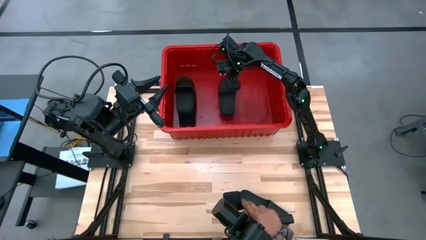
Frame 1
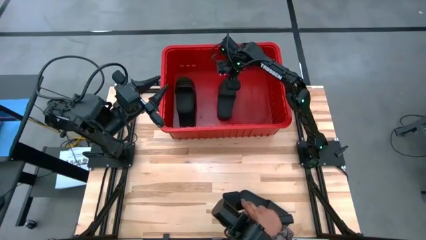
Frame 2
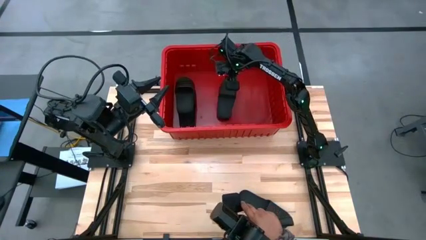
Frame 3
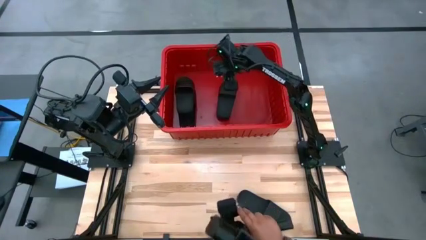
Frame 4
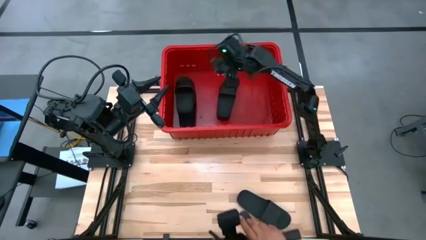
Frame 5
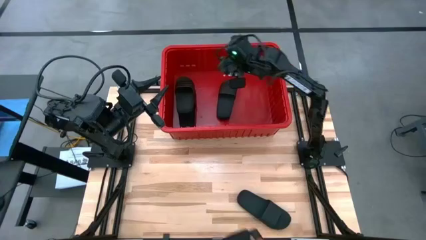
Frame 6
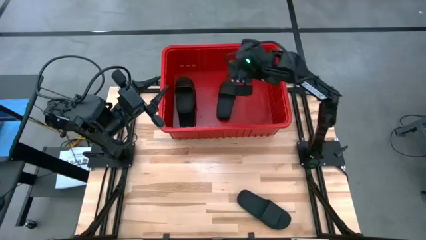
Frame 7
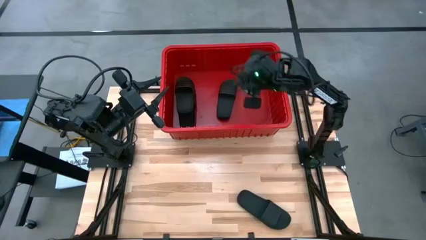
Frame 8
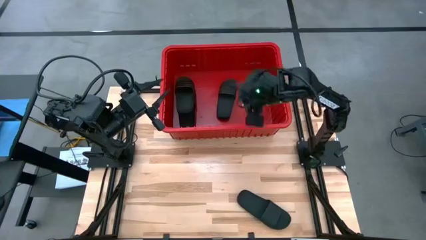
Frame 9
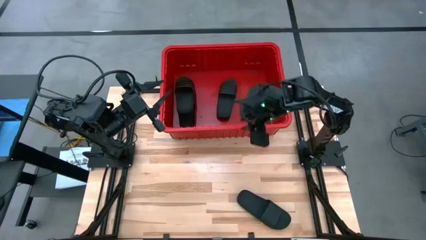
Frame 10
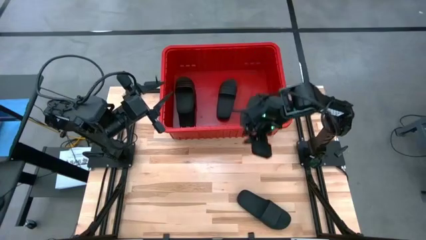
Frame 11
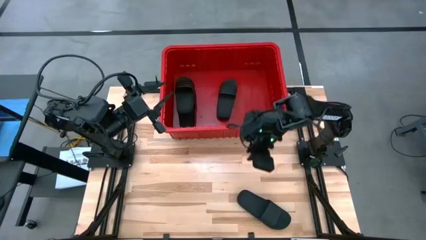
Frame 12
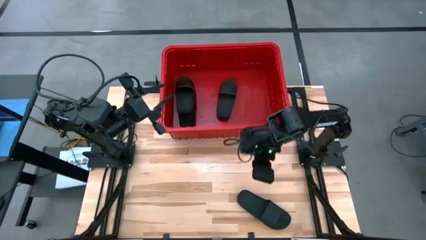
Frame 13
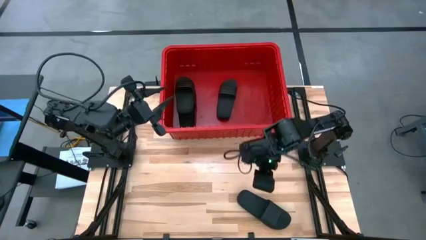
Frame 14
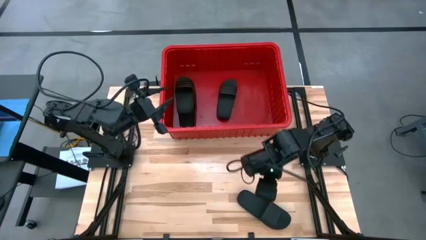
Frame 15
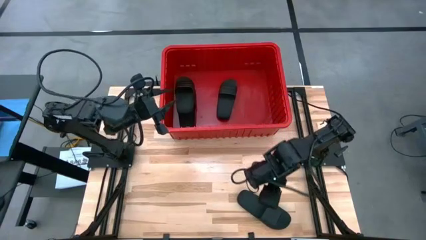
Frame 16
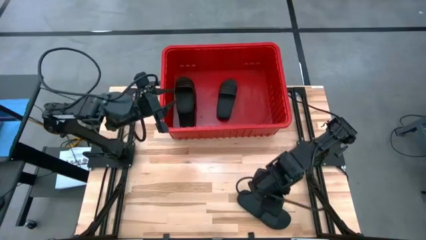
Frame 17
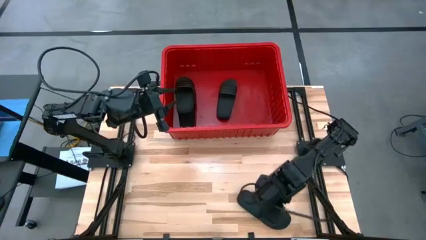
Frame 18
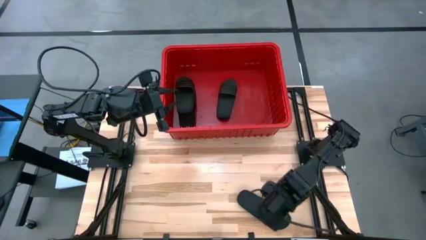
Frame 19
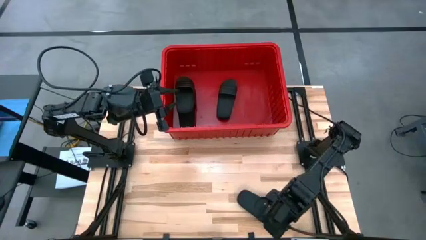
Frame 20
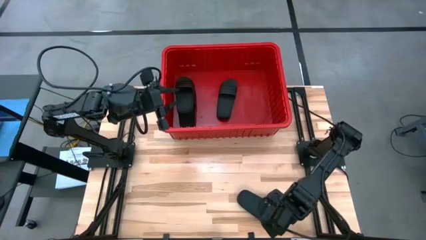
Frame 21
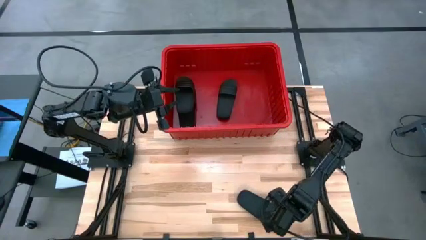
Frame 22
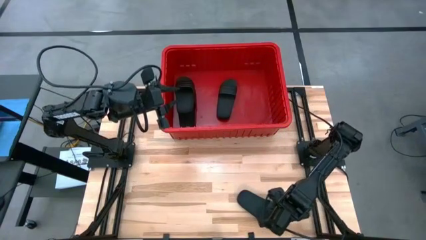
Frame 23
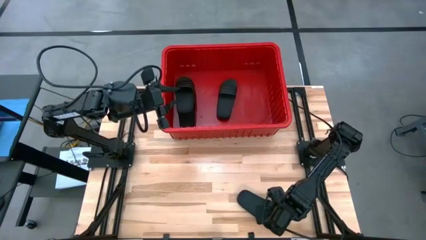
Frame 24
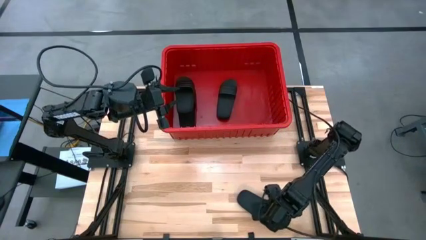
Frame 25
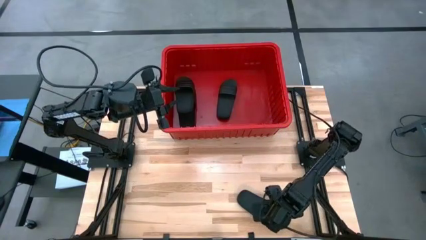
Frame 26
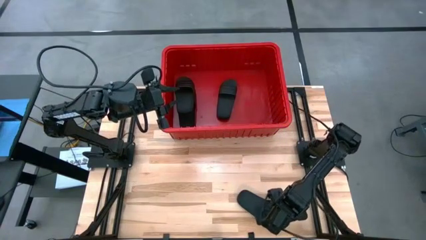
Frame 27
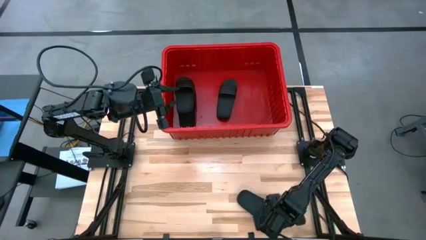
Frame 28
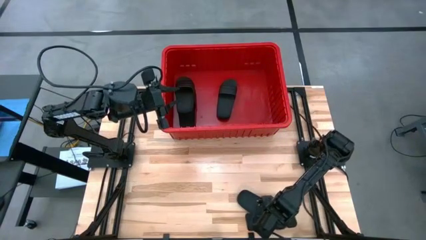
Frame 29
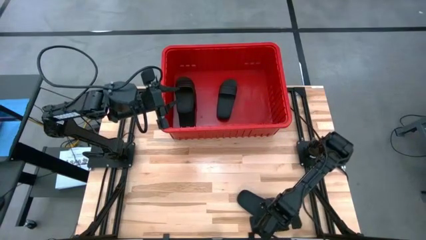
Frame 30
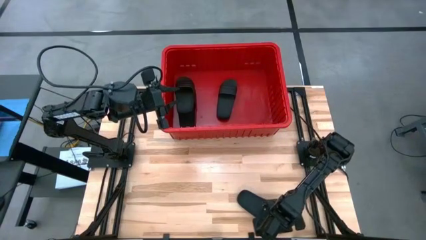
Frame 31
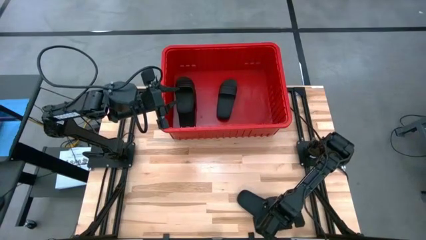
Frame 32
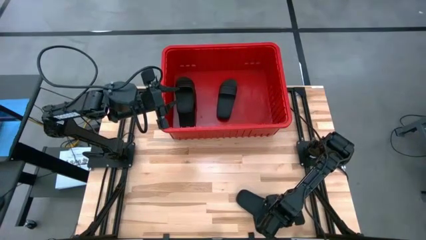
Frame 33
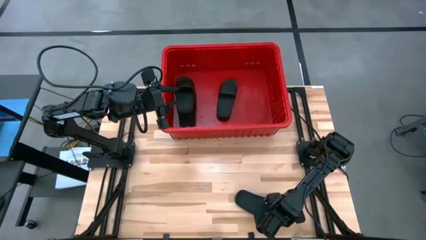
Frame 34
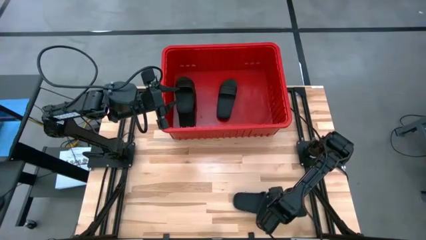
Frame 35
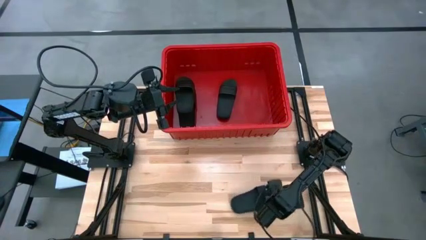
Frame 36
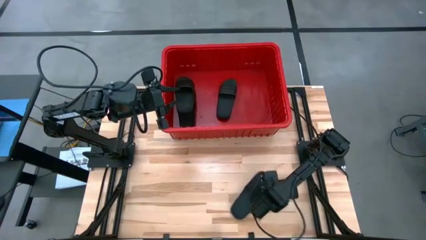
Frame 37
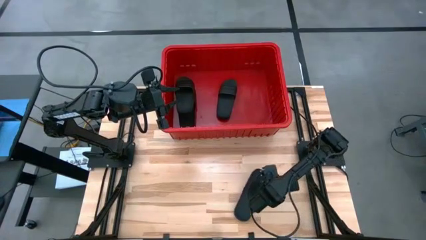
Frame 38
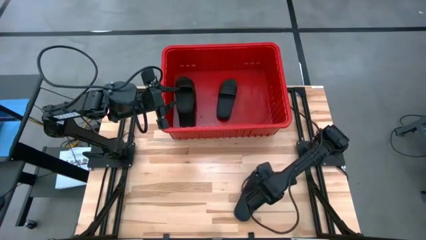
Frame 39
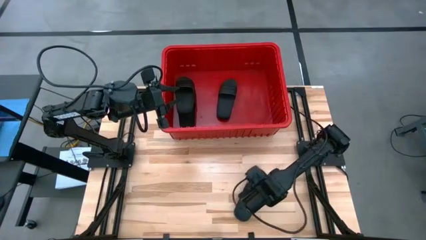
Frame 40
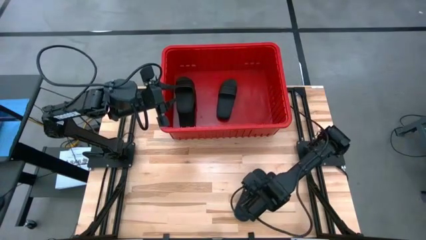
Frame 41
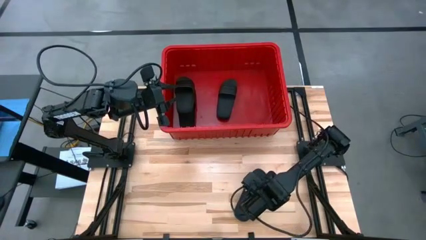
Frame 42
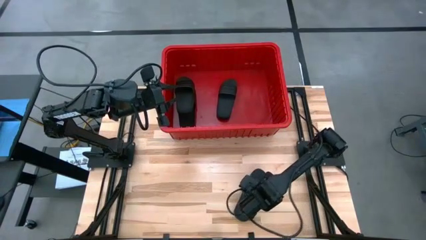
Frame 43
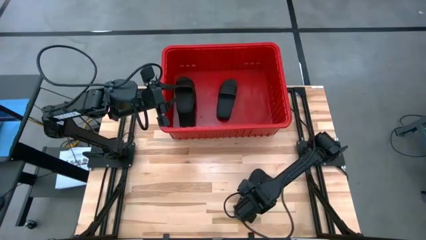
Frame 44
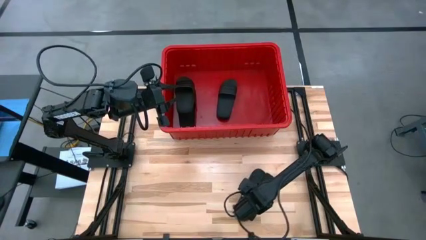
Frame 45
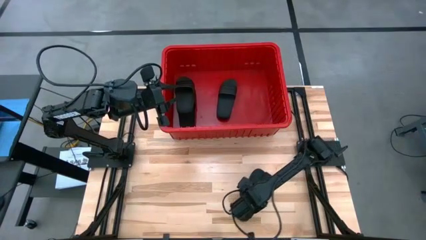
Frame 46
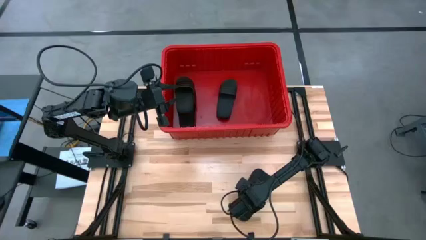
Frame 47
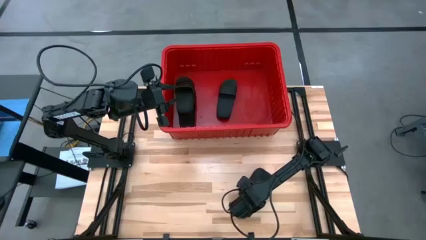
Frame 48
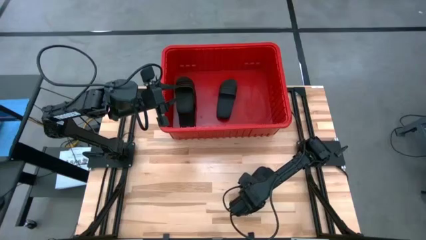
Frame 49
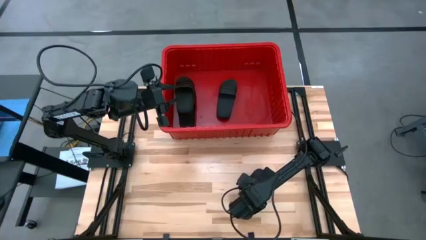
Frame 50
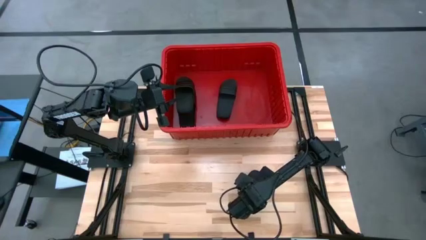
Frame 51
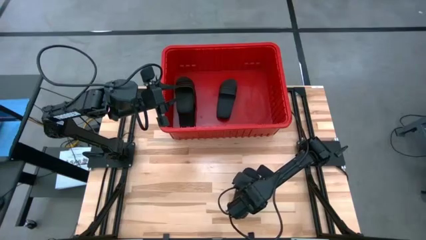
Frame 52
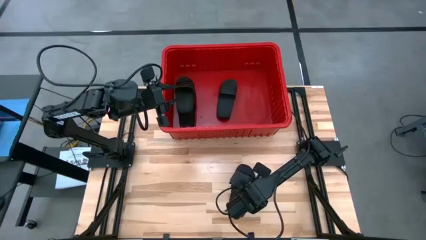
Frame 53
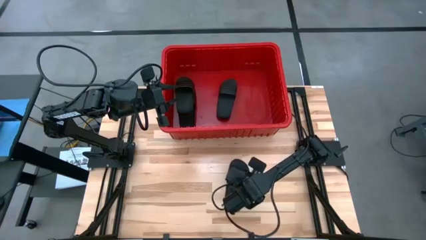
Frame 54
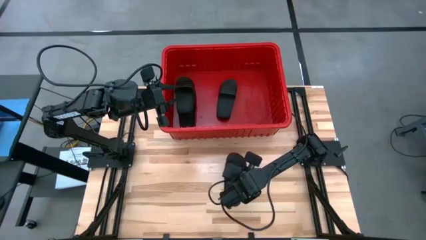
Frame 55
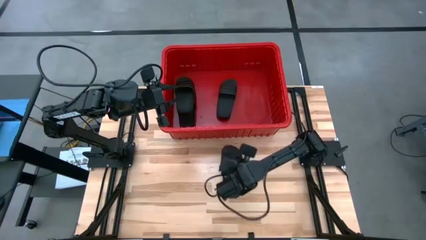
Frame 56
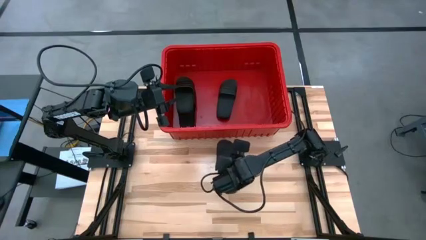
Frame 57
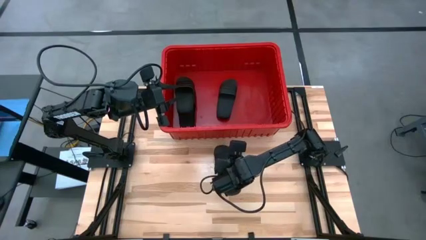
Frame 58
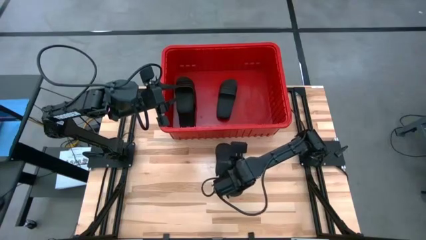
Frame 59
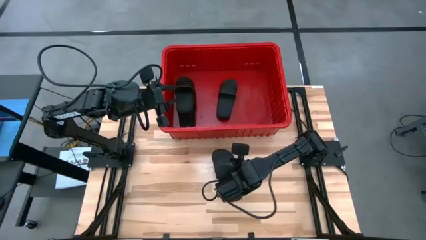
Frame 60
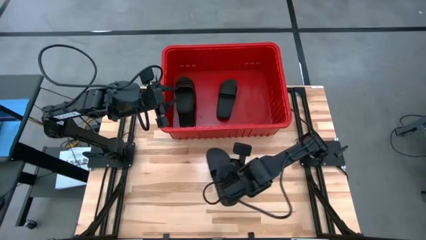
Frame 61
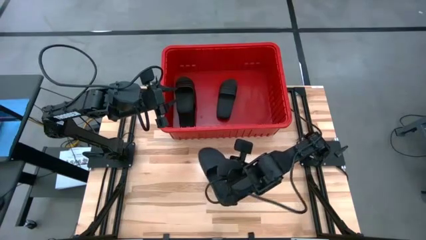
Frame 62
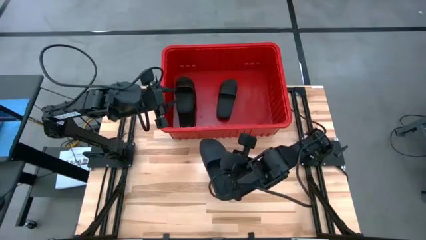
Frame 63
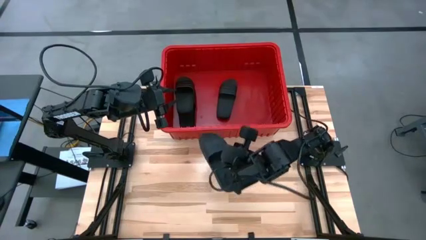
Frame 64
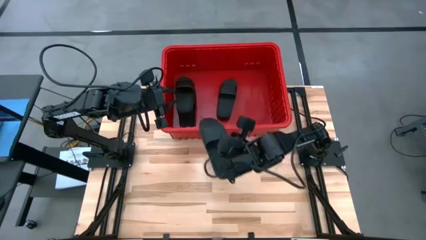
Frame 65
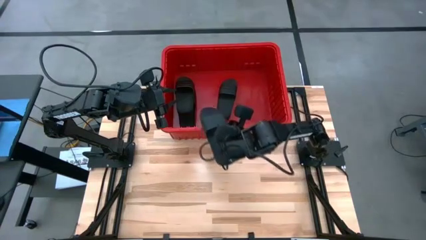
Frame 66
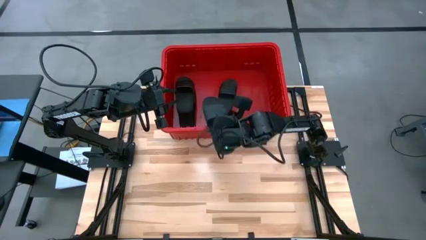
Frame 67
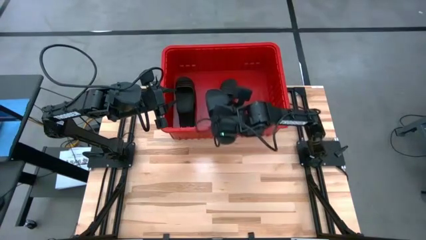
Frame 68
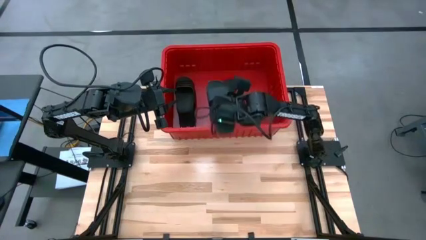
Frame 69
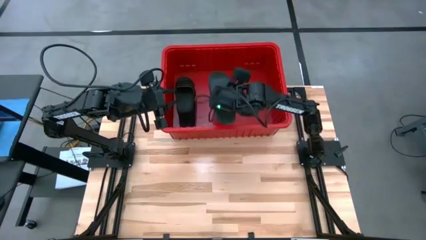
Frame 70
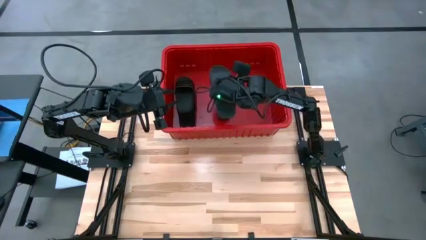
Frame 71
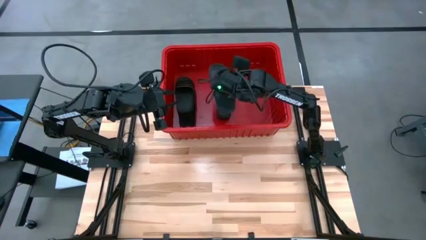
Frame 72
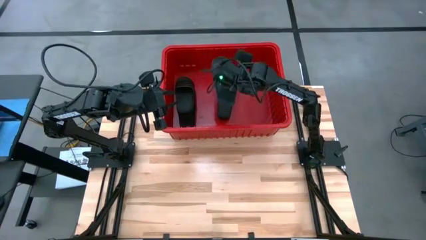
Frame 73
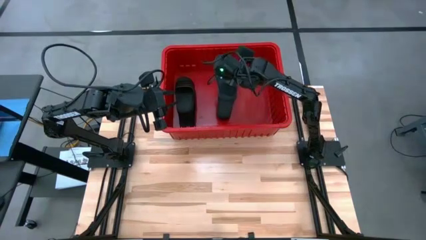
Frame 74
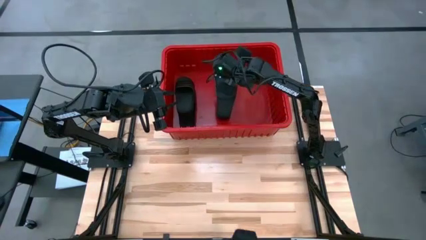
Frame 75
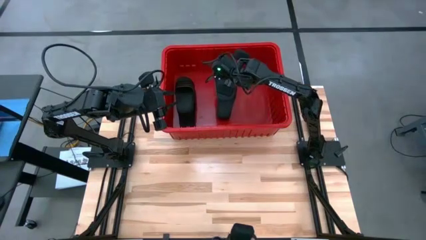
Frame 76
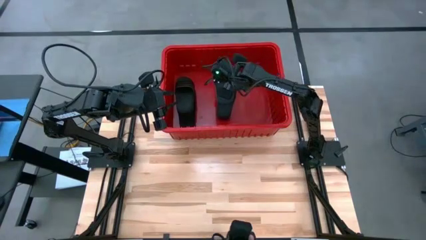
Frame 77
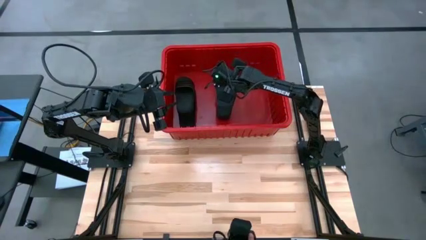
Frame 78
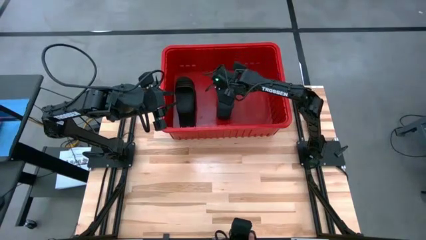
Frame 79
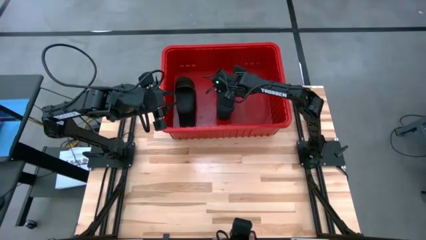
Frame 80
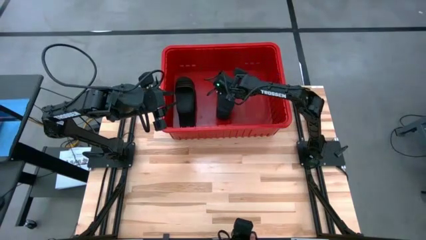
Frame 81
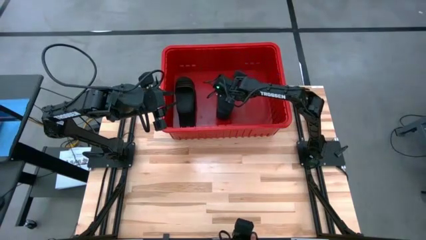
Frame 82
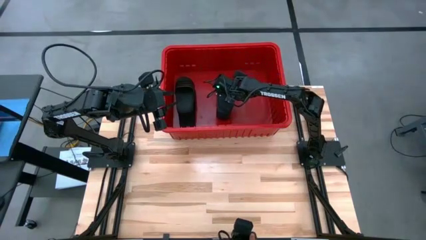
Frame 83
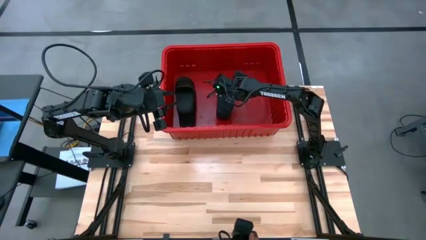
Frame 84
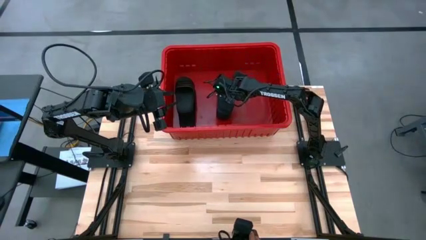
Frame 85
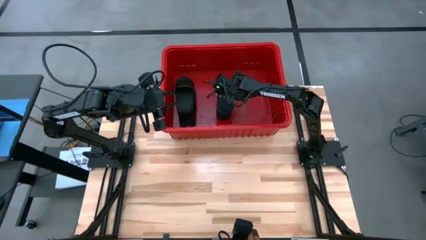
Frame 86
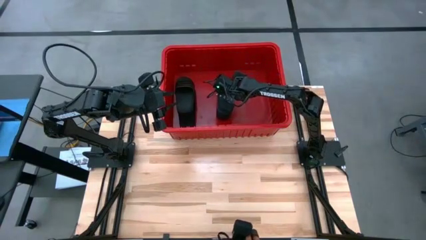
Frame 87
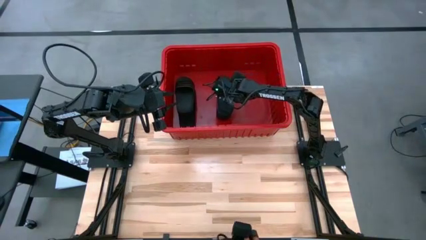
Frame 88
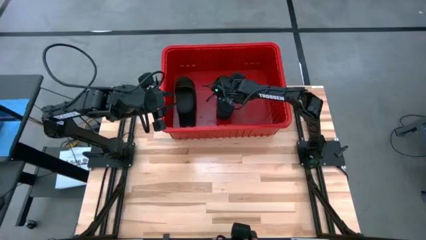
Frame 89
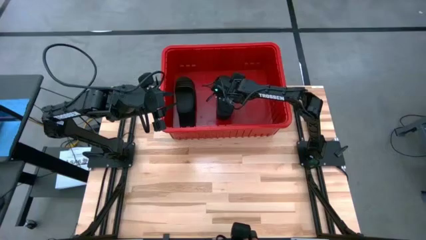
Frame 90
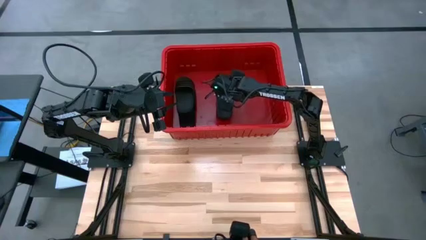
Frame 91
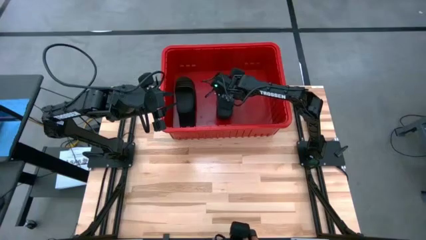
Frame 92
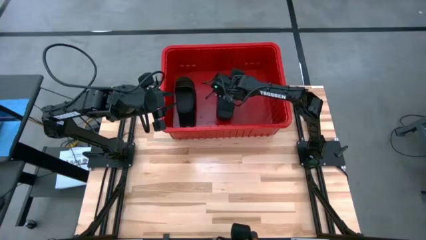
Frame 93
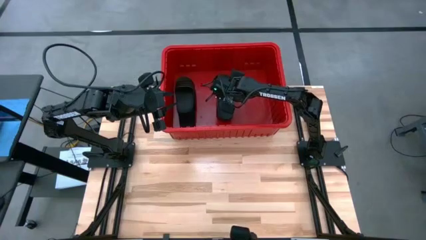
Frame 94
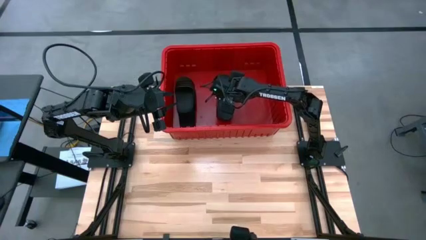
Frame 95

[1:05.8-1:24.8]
Task: Pick and place slides into bin
Put the black slide into the red bin
